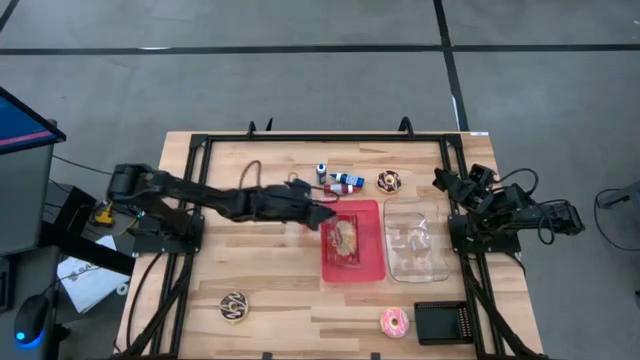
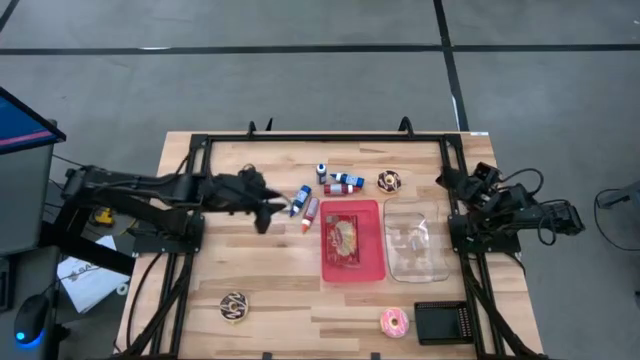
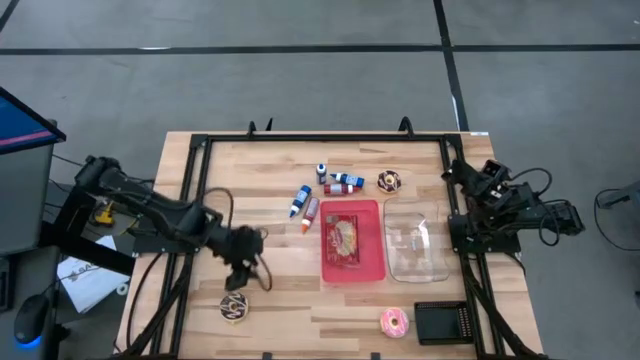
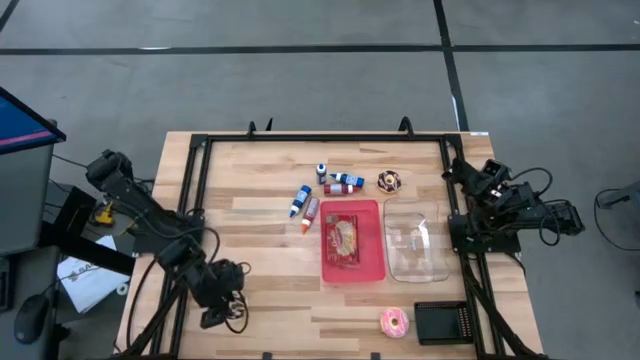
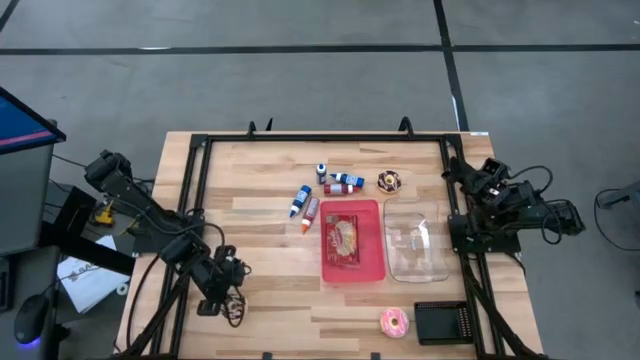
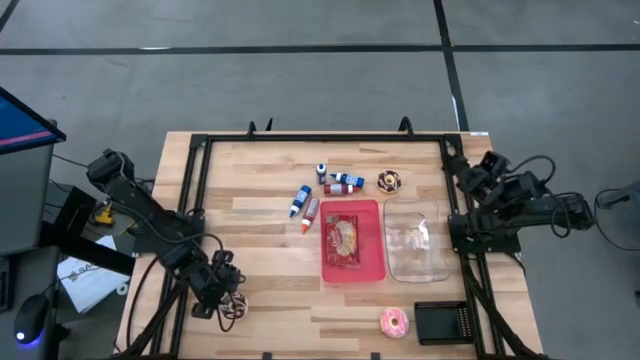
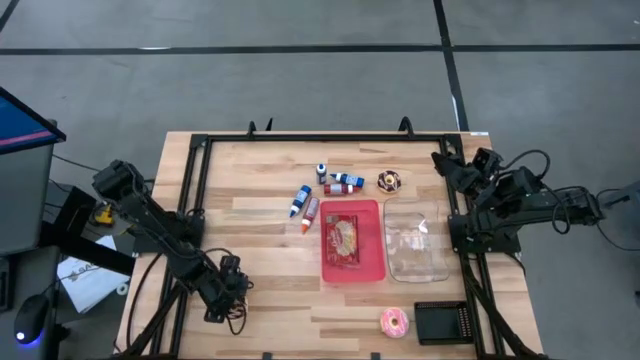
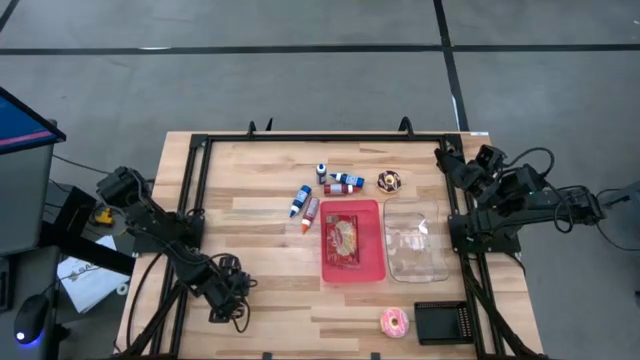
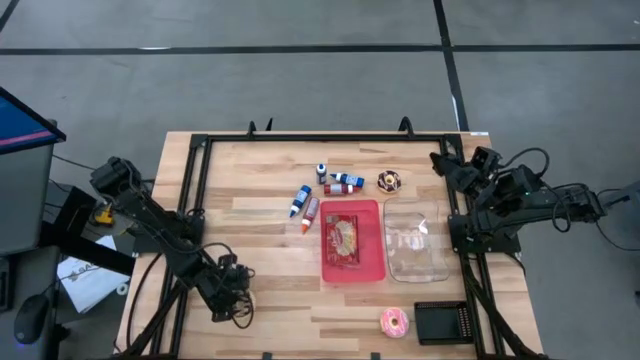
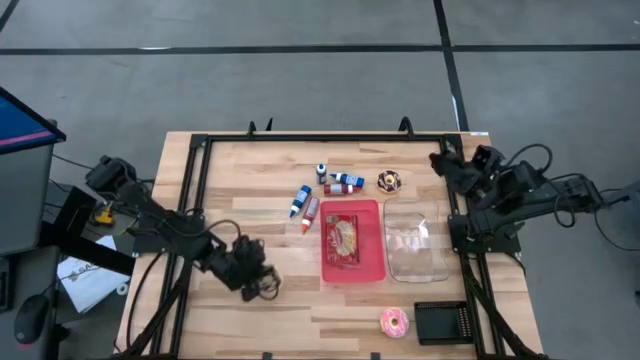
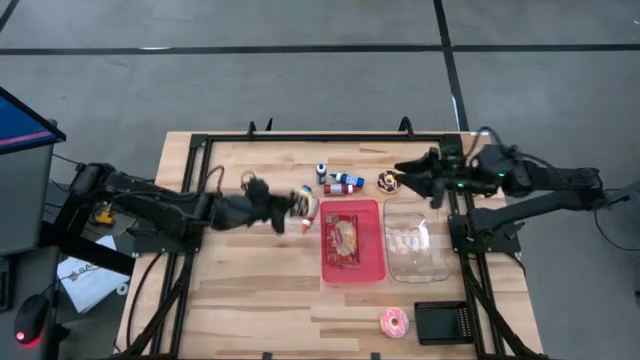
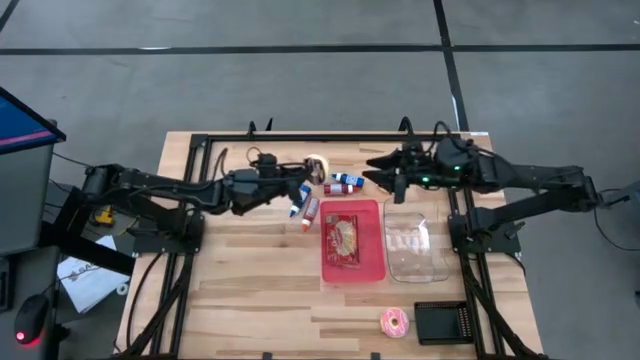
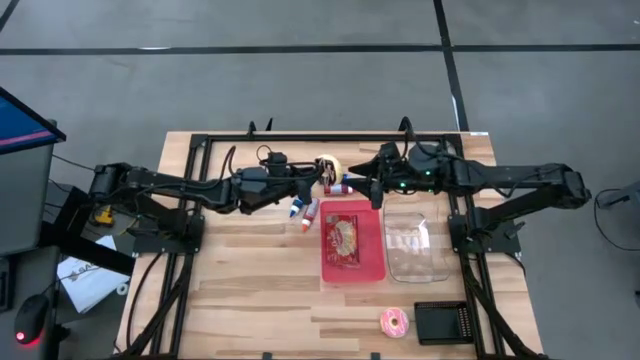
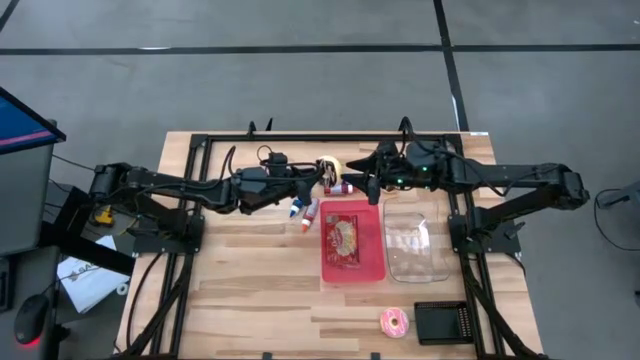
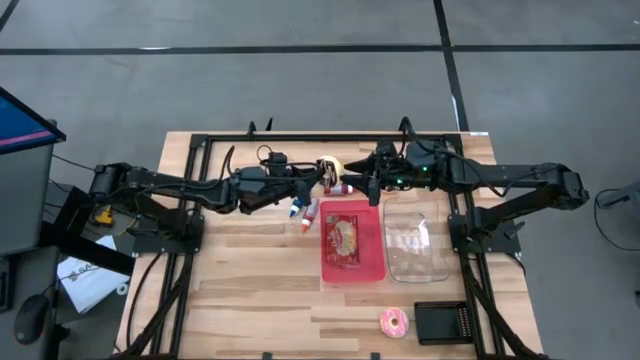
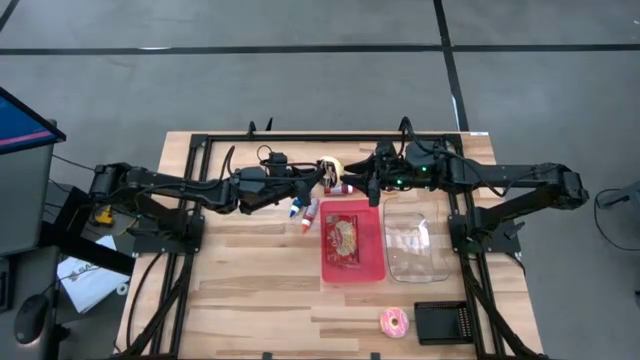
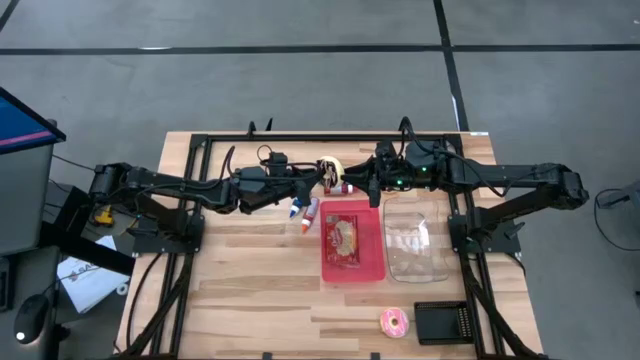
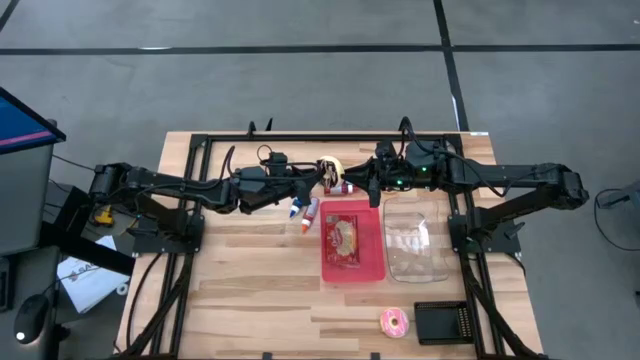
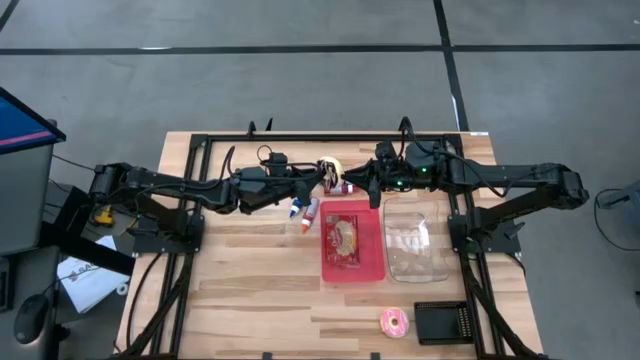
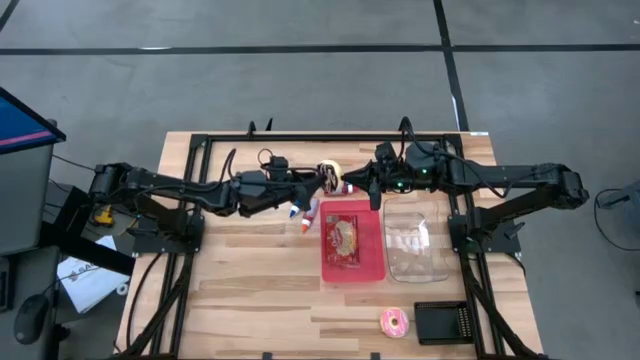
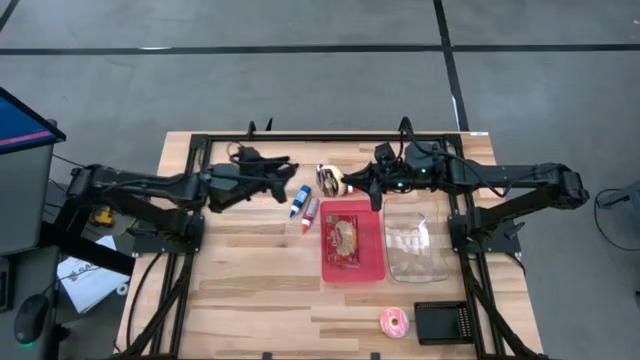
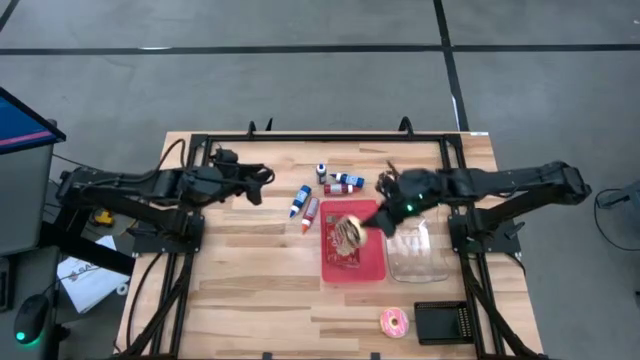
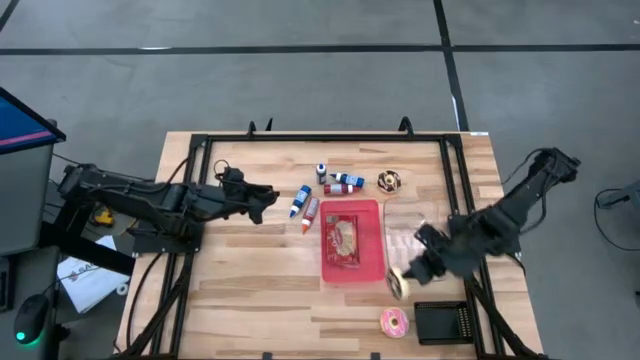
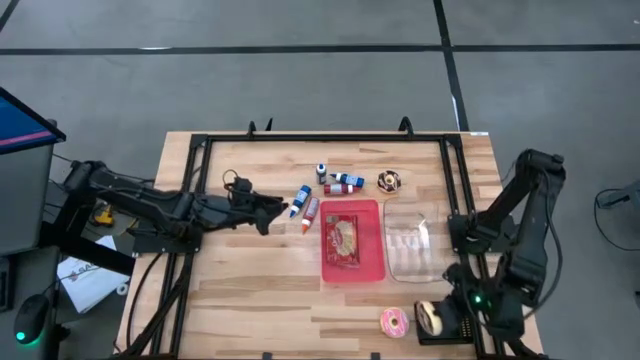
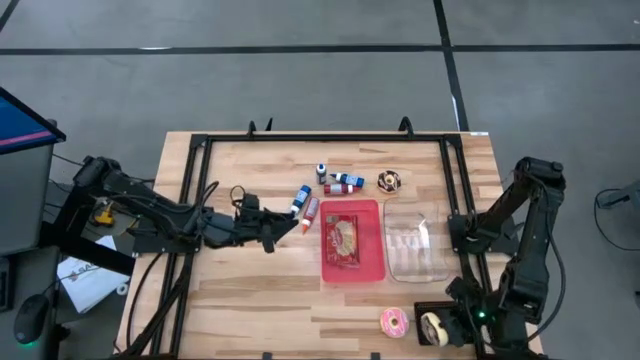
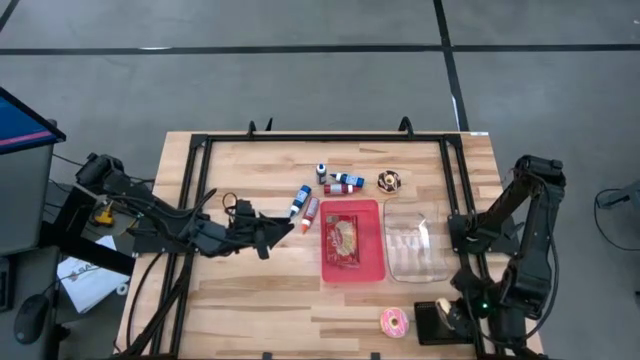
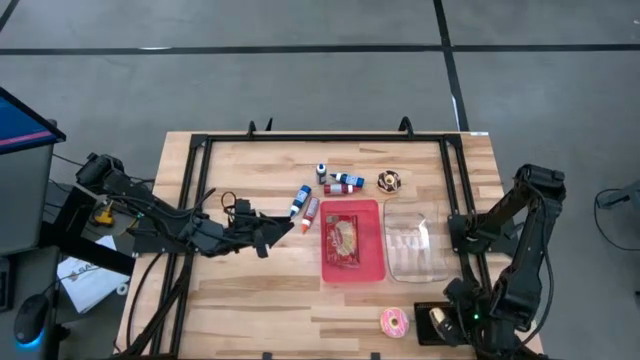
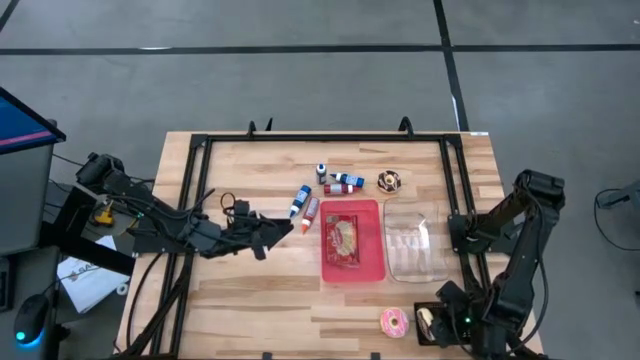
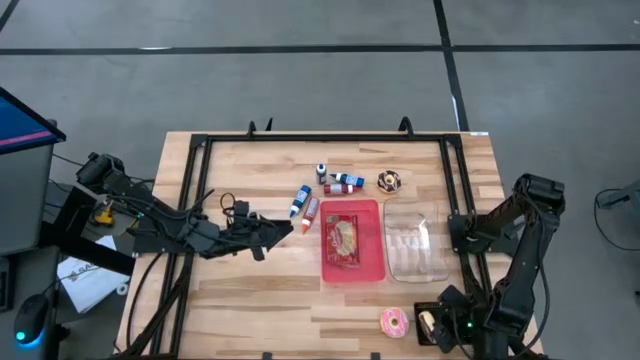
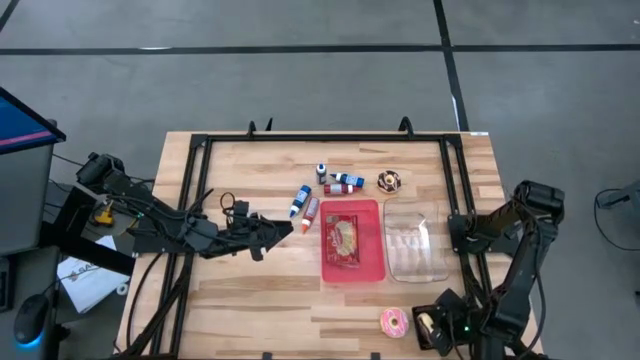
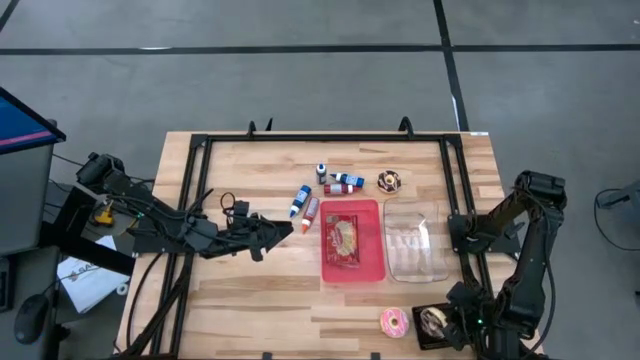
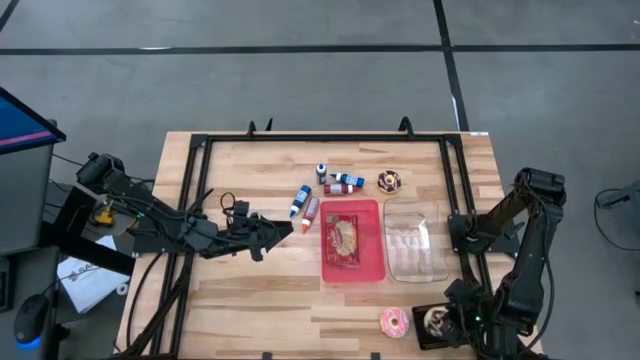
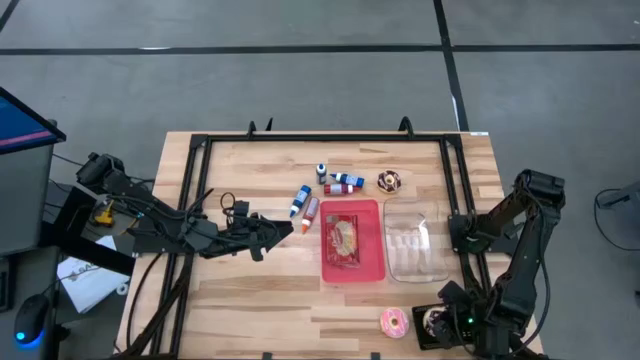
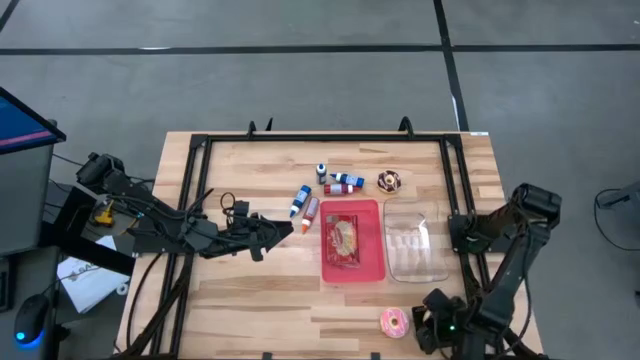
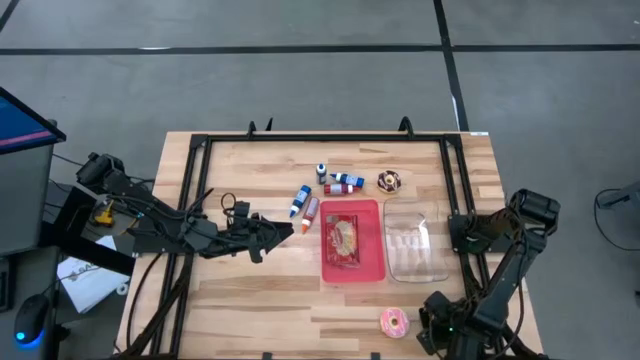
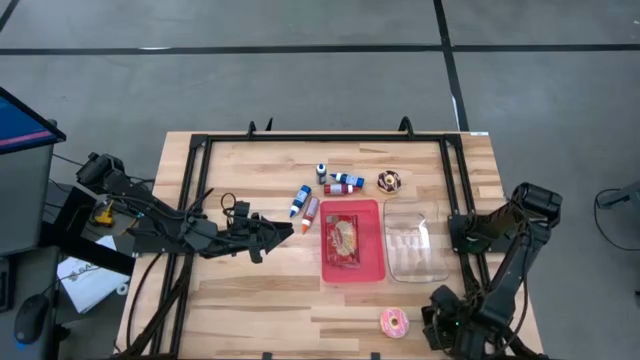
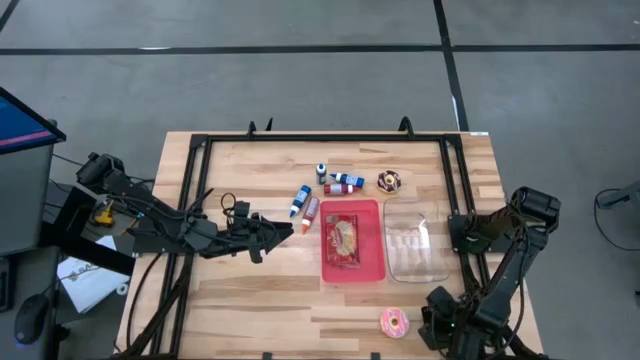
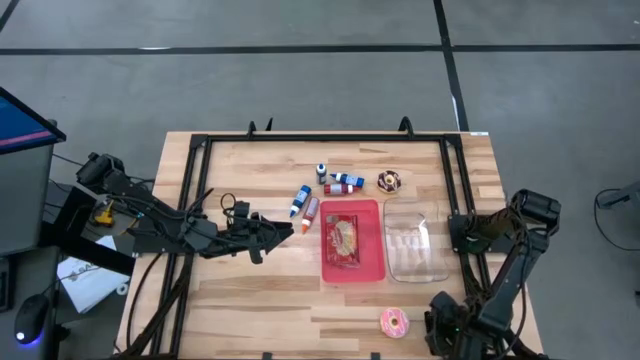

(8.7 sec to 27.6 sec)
Put the bottom black donut into the black bin
